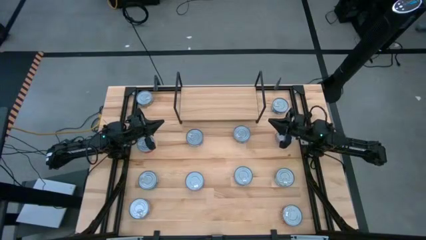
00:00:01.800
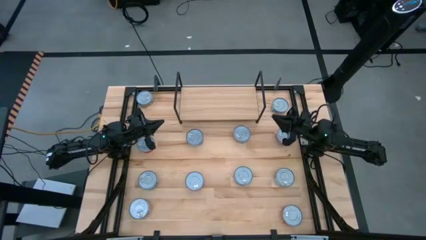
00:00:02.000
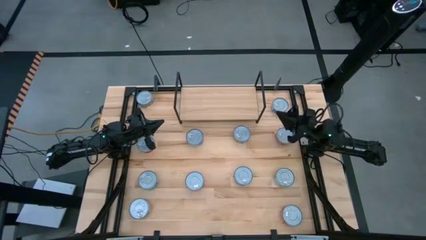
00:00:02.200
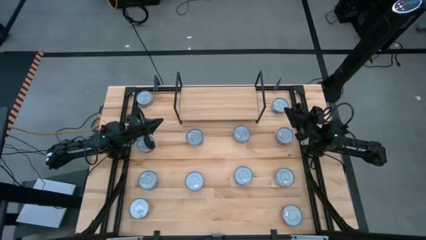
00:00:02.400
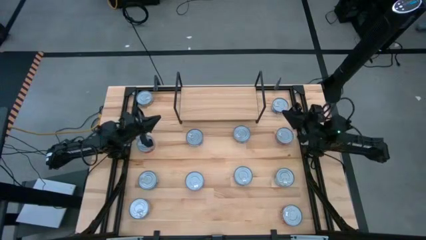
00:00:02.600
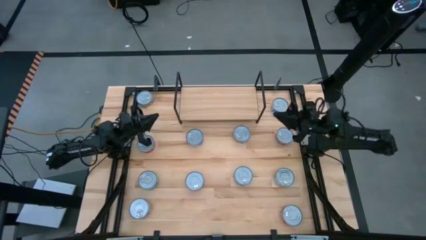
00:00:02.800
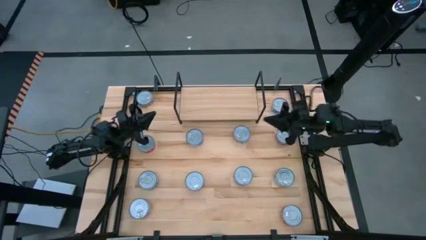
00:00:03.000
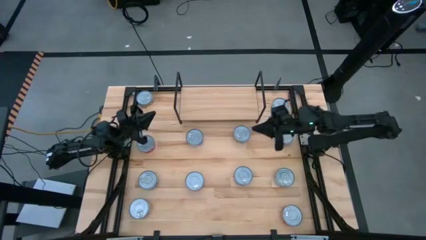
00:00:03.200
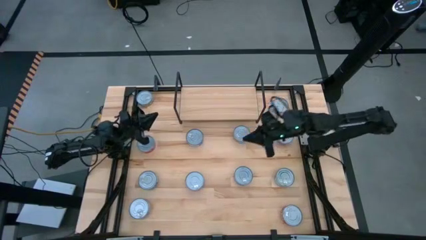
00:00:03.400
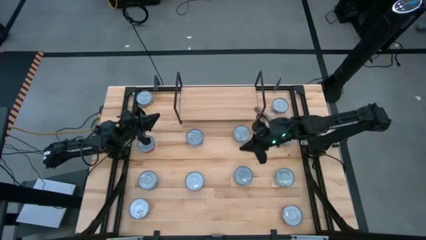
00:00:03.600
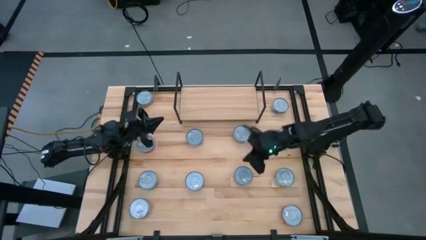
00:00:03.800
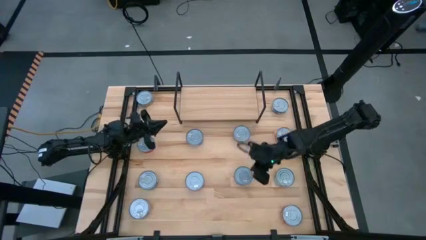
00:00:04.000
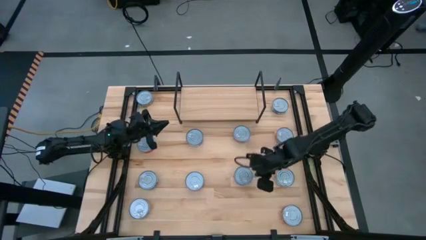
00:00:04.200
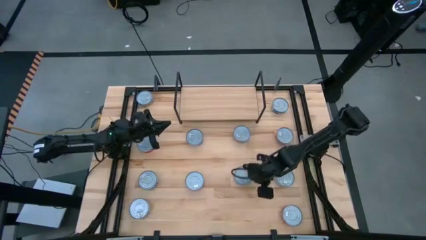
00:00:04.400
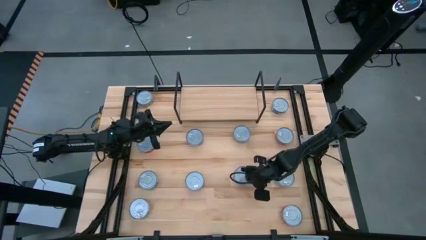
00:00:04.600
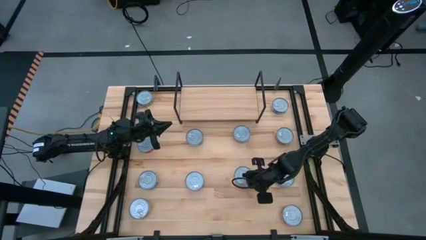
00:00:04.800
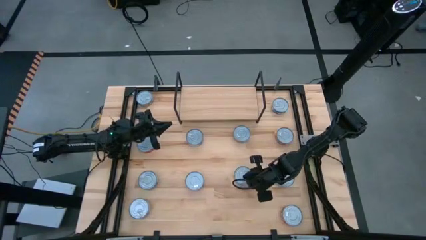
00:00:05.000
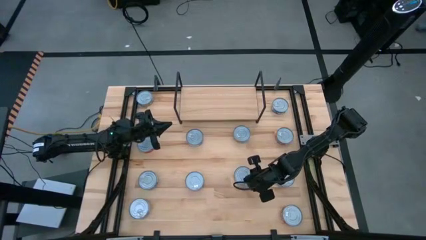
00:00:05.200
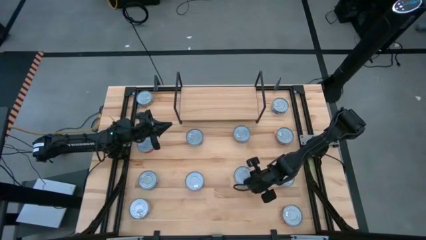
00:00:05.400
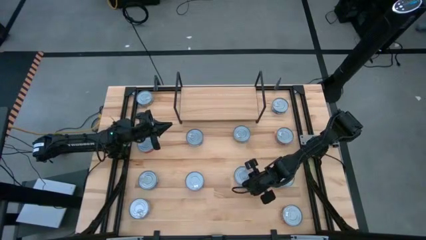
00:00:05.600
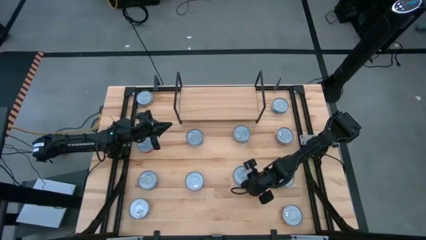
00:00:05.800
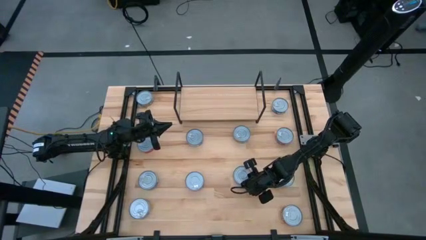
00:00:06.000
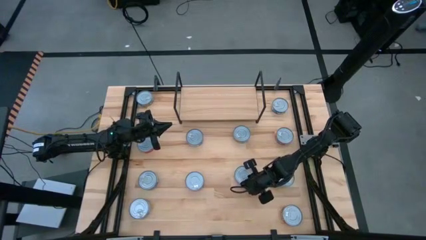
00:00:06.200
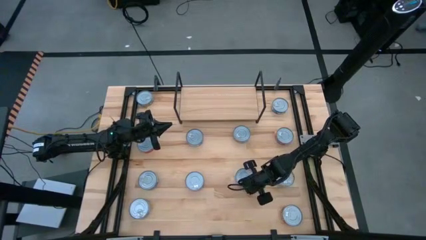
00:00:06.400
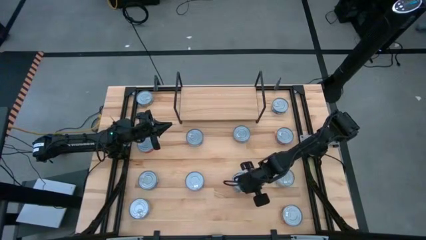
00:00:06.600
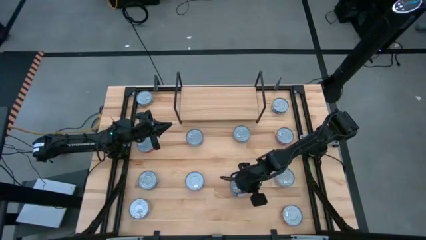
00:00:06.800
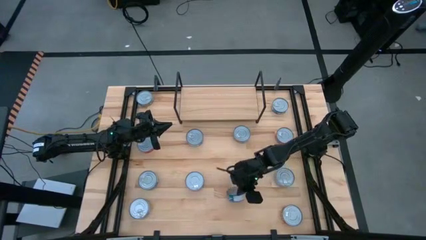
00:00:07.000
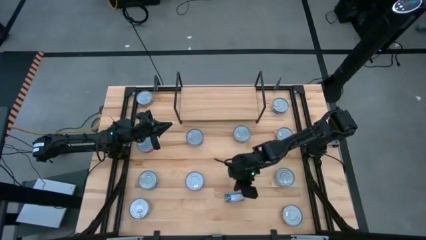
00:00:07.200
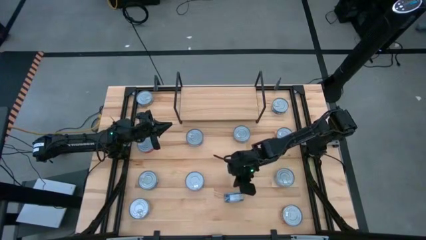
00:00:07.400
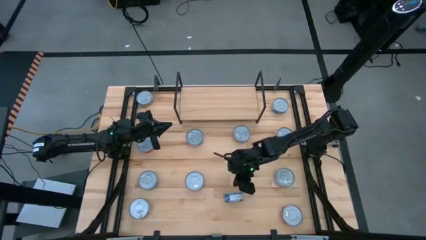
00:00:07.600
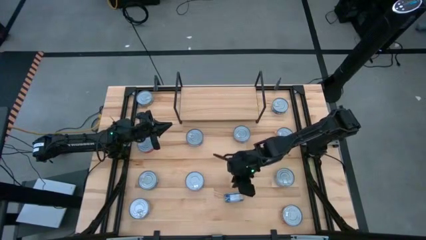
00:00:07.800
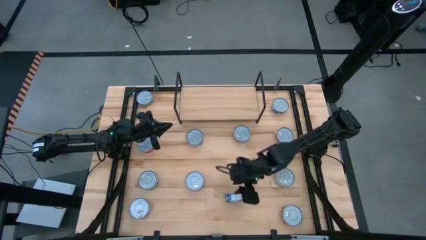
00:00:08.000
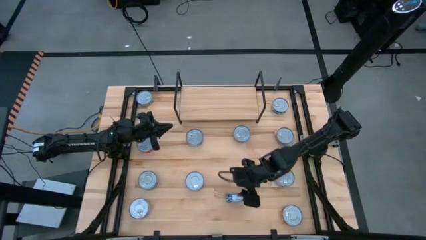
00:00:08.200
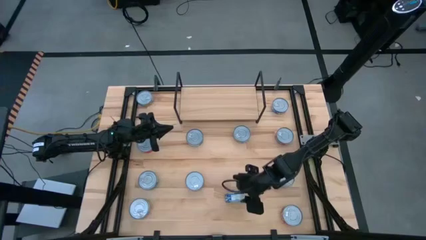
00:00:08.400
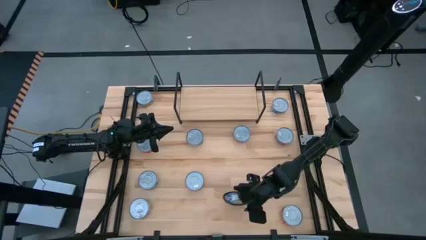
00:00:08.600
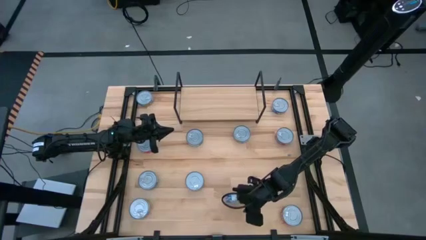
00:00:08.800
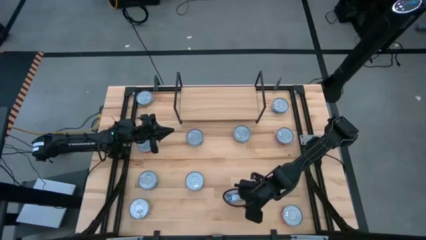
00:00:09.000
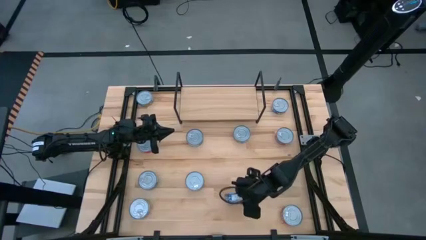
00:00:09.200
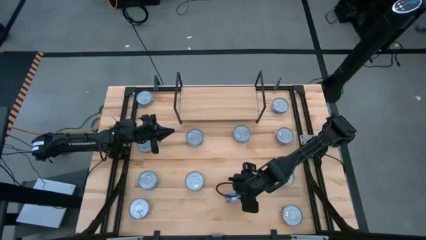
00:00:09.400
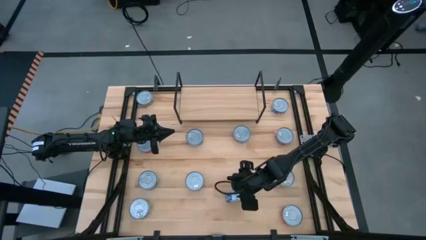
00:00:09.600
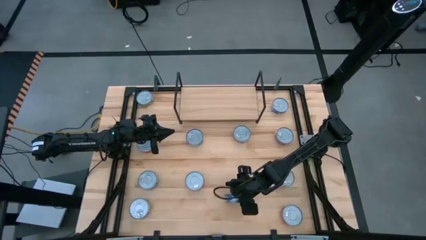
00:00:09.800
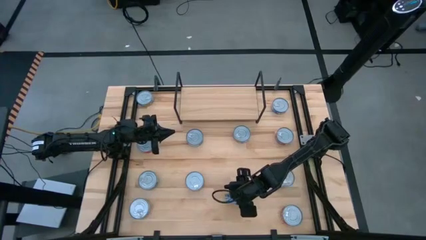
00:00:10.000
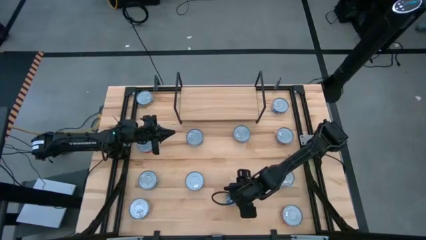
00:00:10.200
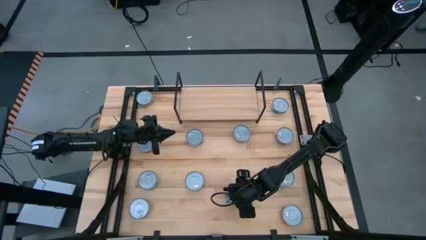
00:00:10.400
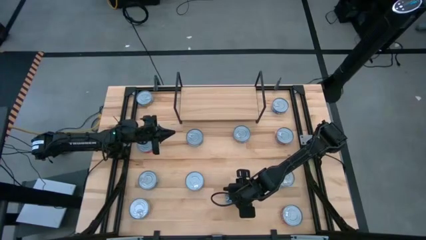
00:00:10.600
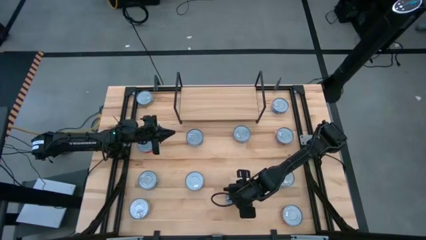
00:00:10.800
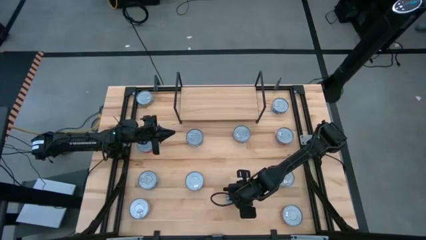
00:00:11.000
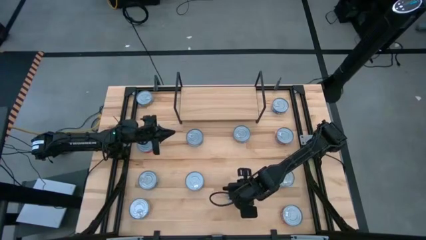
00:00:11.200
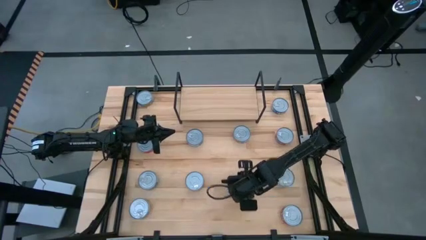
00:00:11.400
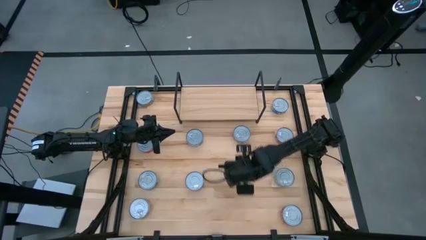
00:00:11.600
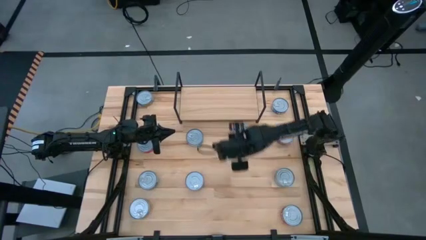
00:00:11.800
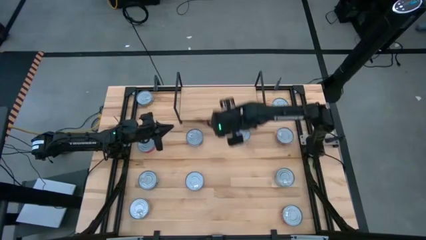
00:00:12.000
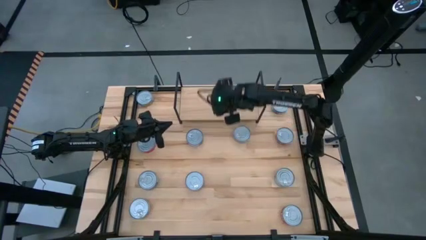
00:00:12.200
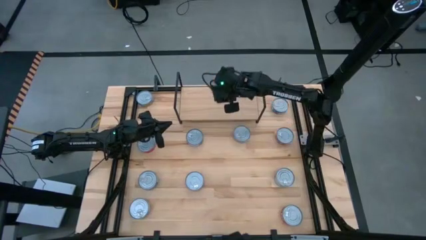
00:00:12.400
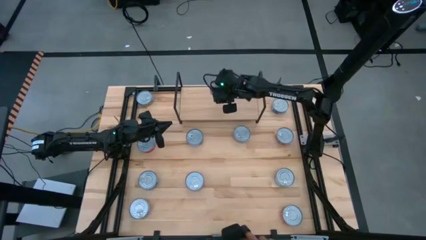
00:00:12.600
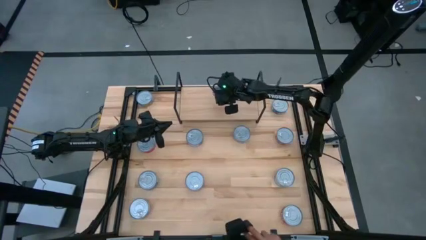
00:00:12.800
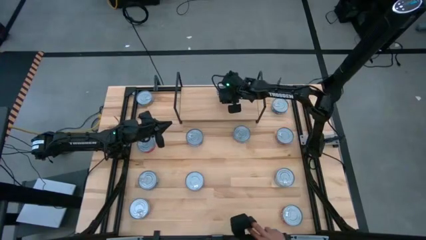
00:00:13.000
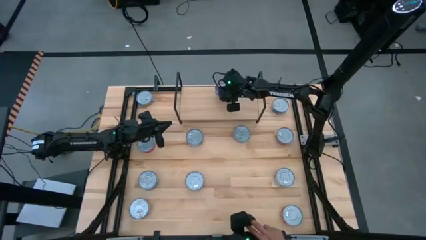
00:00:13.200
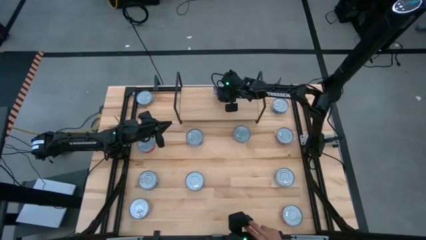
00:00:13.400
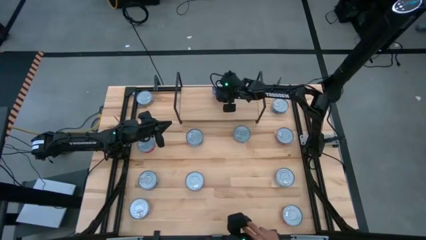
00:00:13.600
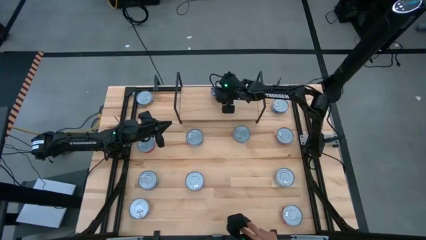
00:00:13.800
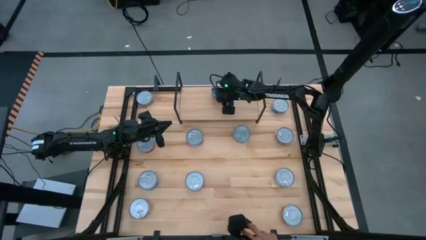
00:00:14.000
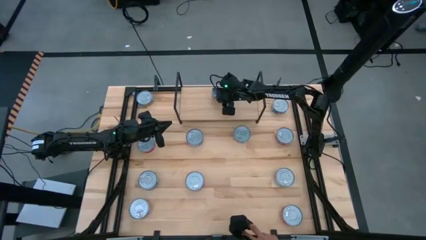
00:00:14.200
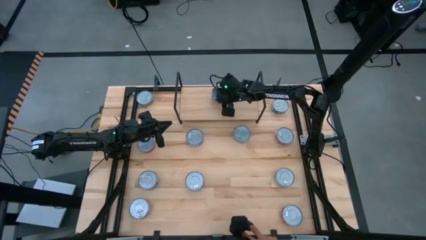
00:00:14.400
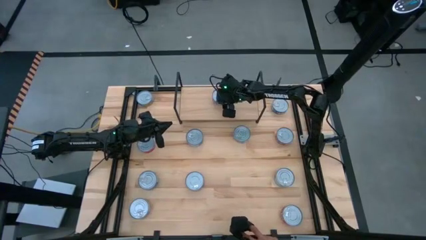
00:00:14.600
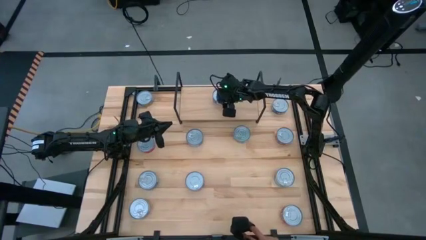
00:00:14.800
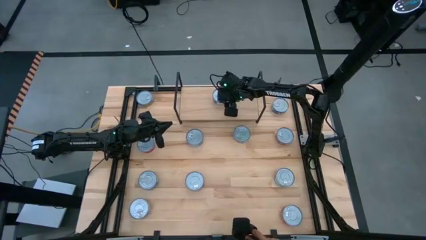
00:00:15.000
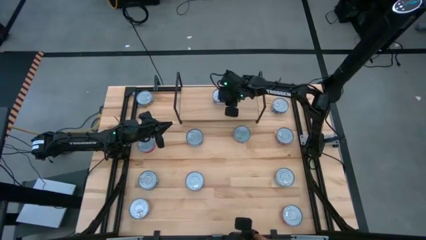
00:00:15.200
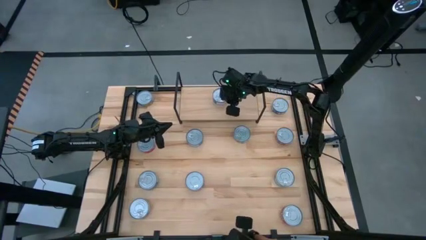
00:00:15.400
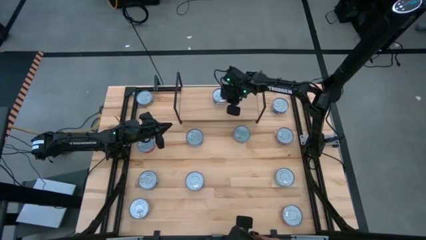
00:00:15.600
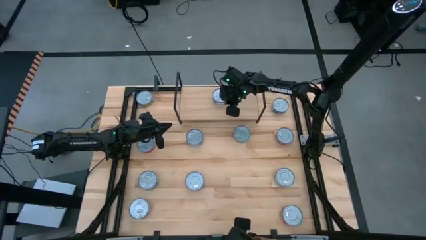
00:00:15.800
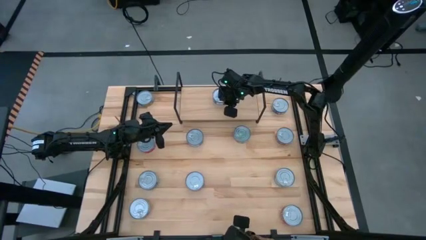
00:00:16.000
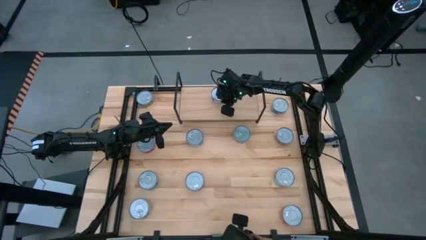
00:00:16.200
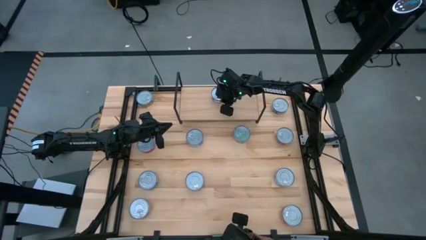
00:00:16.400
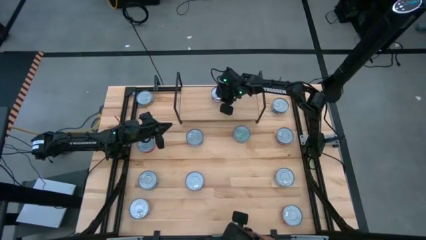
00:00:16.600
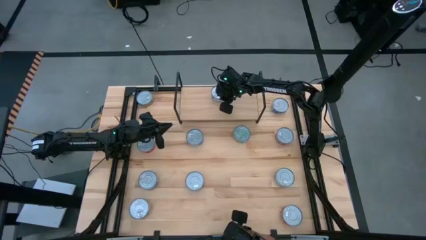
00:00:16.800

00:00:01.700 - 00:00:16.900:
Task: Stack canned seafood by type on shelf
Put the blue tuna can on the shelf
